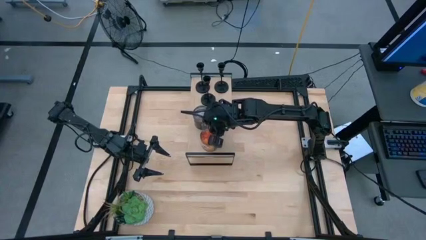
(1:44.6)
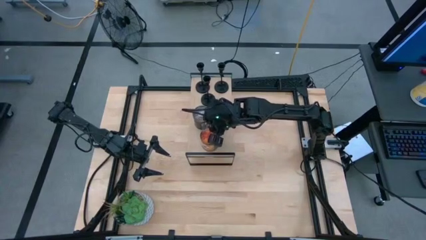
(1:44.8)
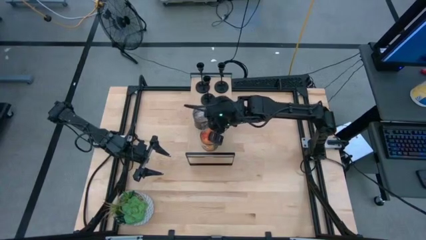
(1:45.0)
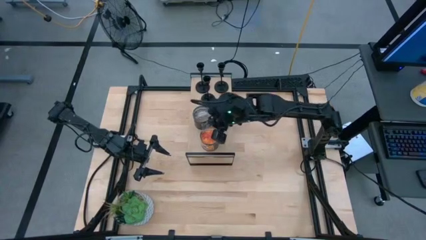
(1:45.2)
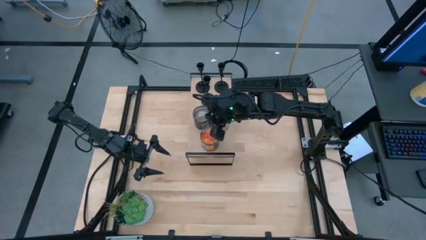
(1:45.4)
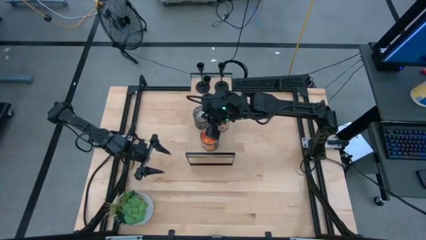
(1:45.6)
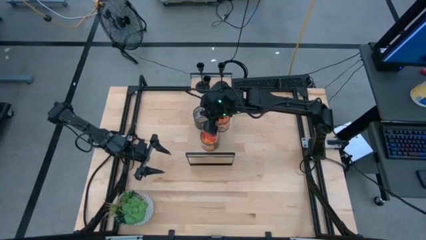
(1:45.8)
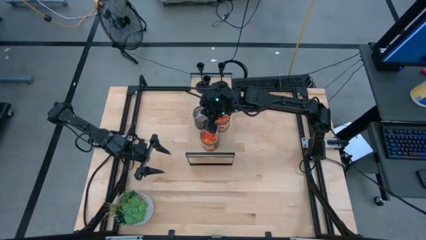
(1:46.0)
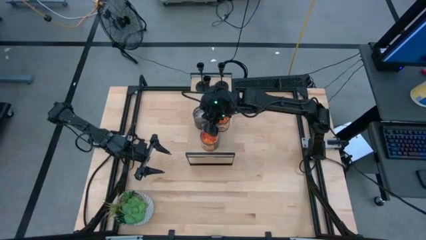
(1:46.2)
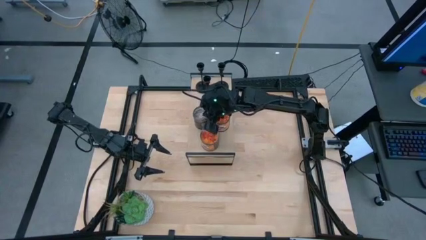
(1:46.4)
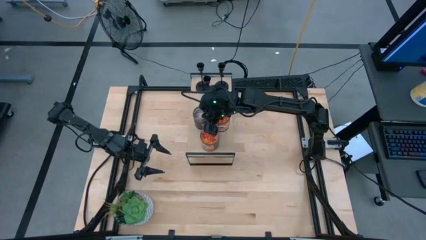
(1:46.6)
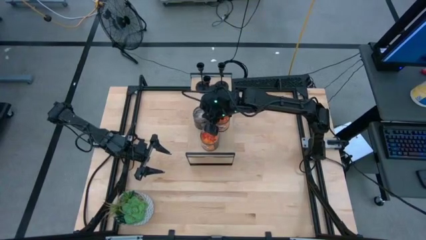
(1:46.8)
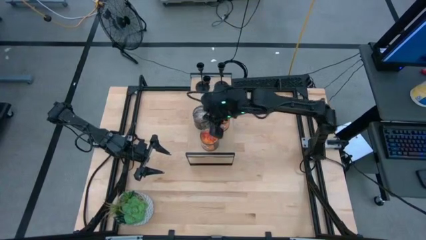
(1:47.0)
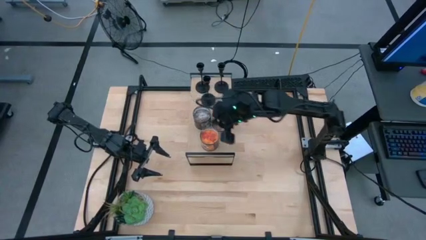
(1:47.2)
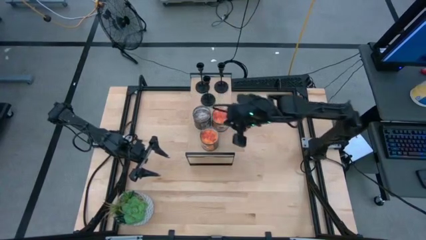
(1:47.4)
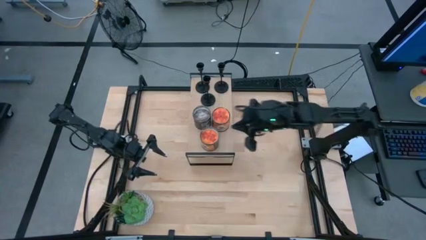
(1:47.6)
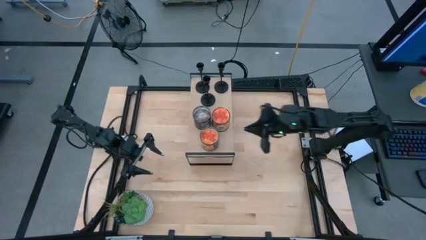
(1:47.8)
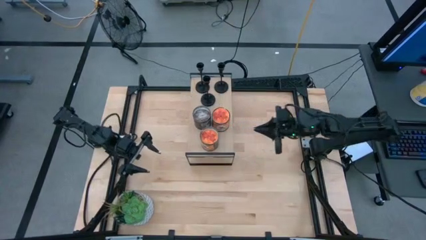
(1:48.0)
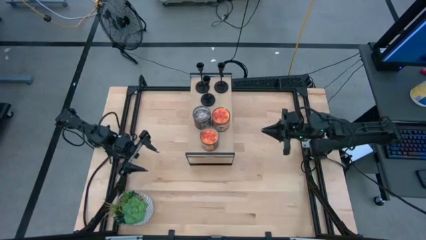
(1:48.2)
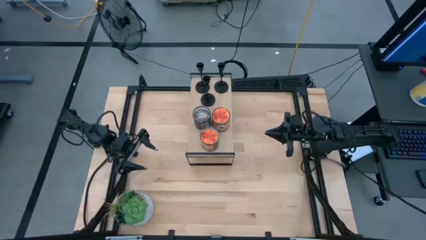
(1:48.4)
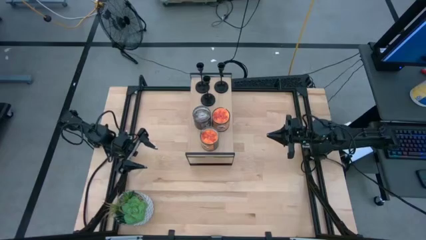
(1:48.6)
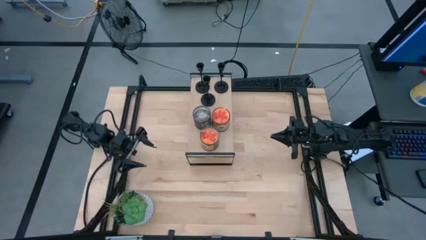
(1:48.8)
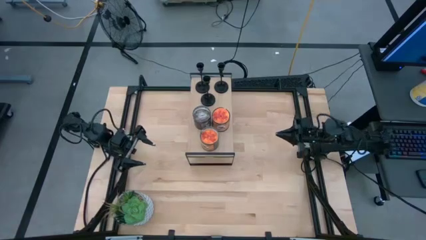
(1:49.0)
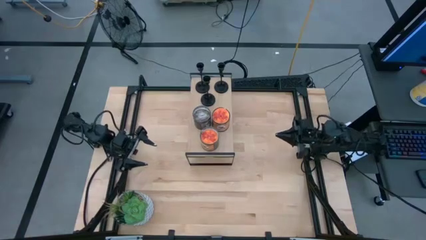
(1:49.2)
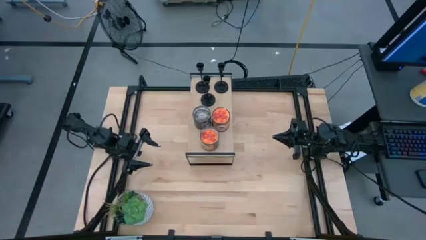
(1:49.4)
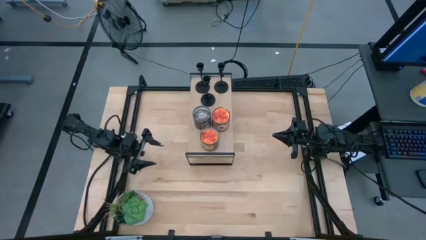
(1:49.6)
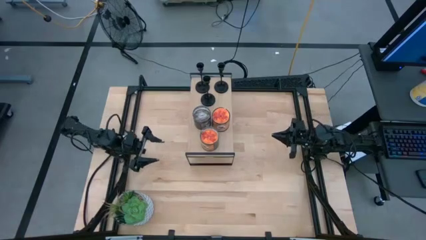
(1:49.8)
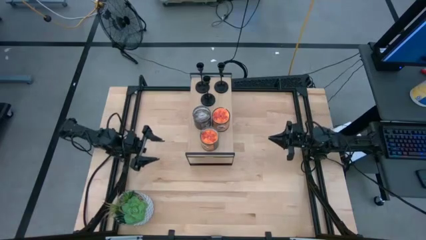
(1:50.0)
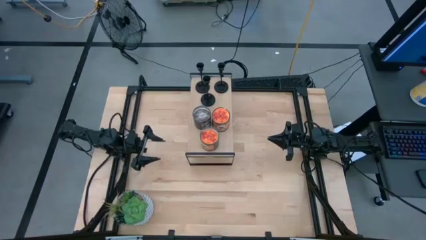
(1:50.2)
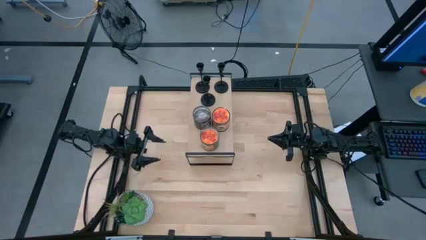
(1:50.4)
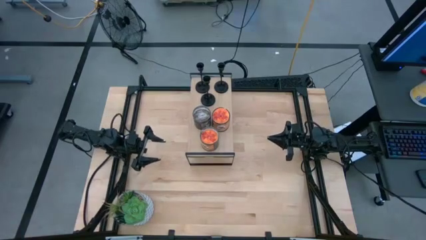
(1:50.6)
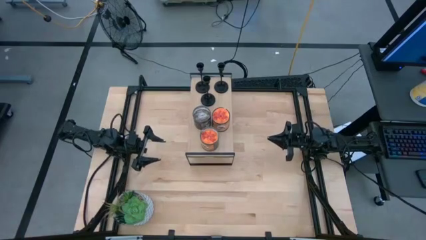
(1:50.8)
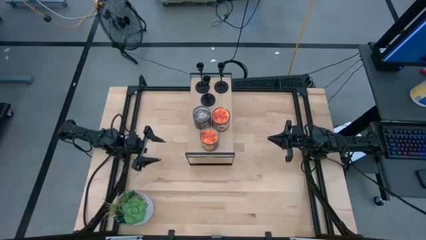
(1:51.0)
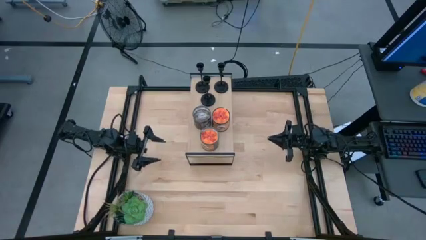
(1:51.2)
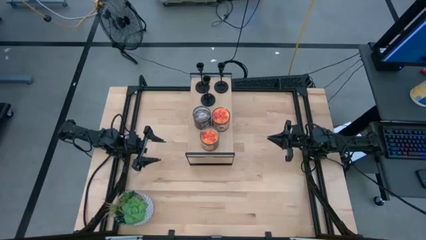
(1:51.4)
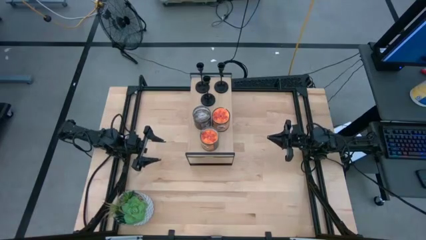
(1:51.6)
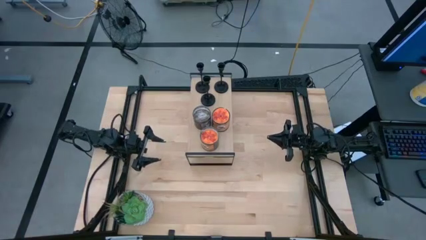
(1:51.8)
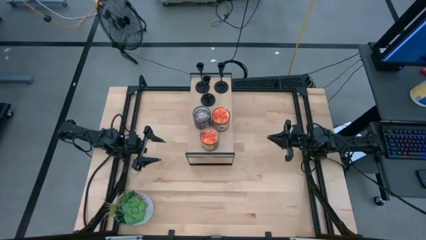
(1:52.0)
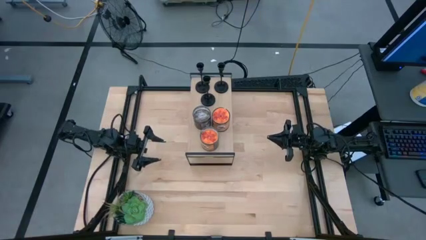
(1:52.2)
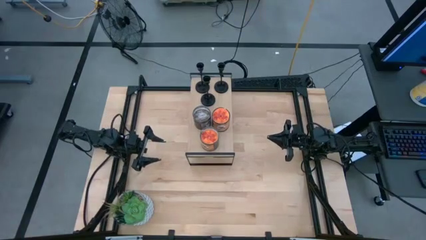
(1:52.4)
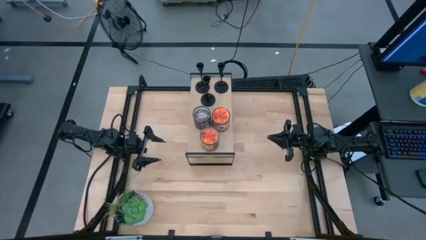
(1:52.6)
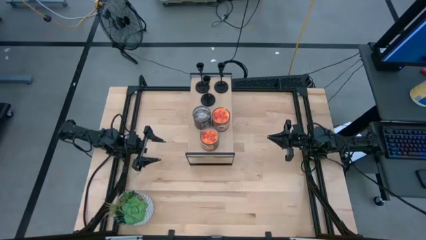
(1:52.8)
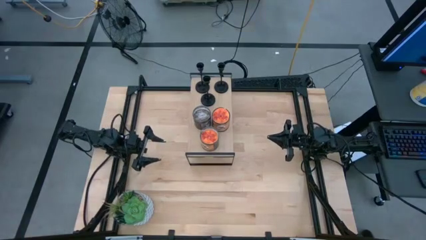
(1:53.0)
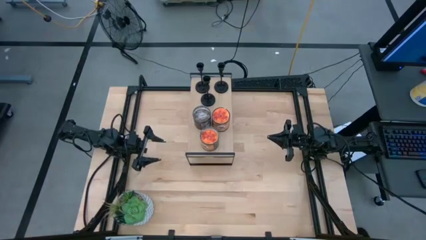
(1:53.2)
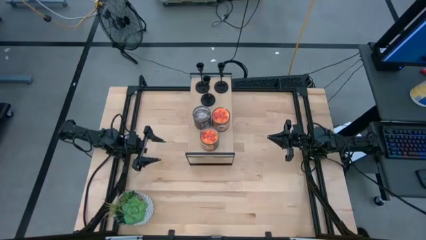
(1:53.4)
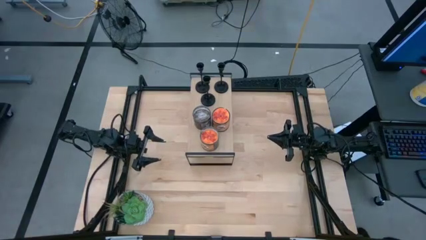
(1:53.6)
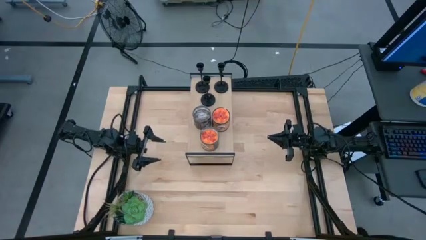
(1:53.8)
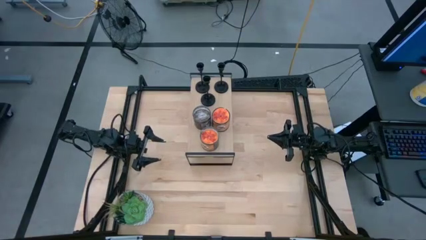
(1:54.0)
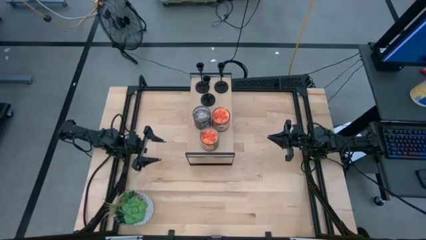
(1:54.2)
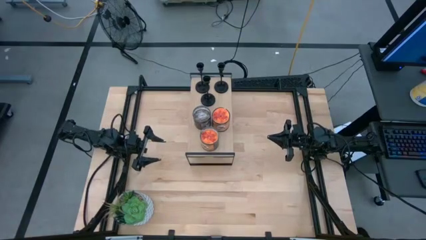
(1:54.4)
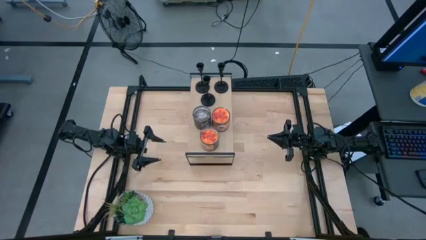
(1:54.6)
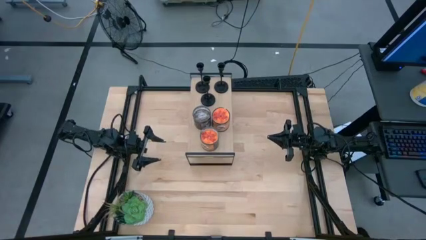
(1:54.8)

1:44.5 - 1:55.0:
Task: Pick & Place candle stick holders
Return to Home Position

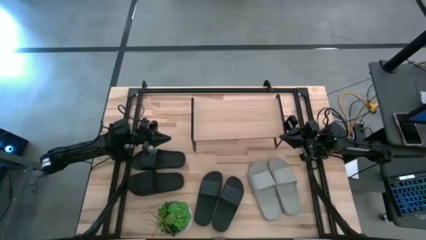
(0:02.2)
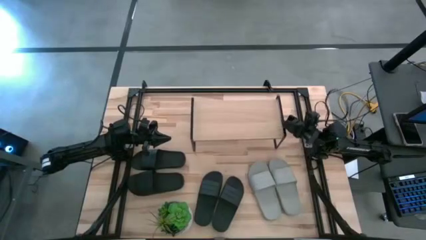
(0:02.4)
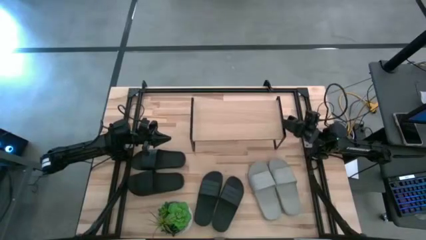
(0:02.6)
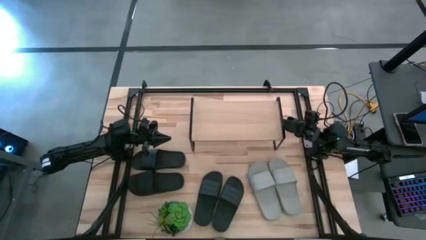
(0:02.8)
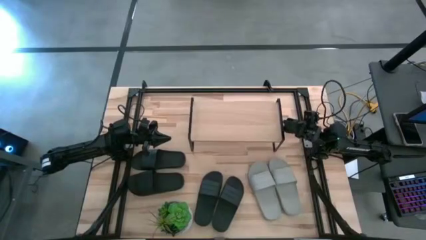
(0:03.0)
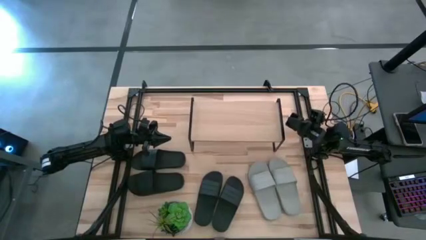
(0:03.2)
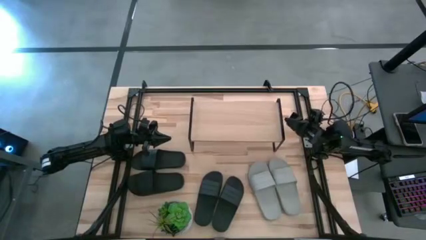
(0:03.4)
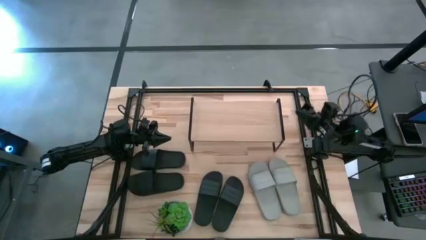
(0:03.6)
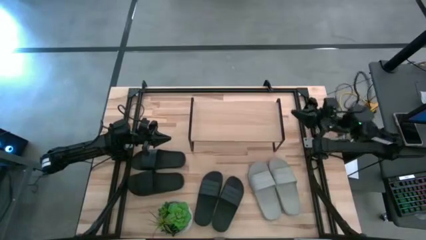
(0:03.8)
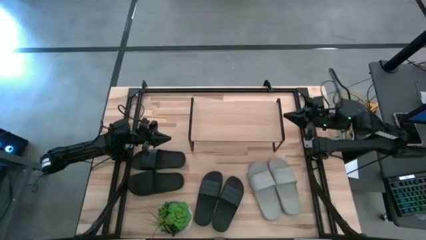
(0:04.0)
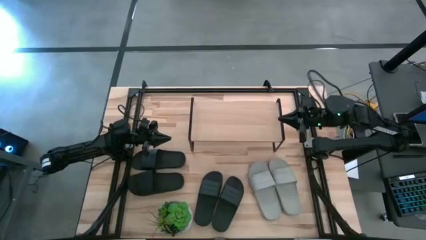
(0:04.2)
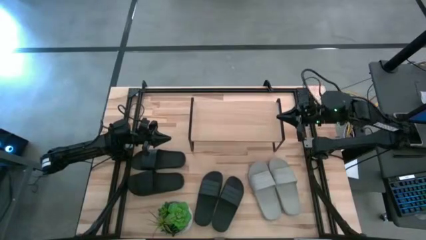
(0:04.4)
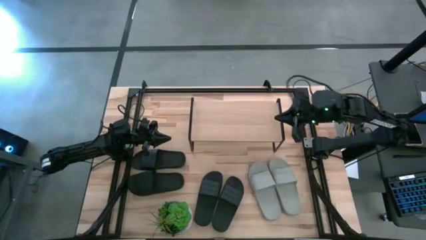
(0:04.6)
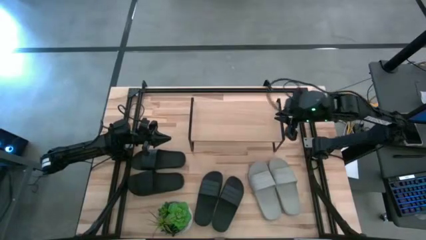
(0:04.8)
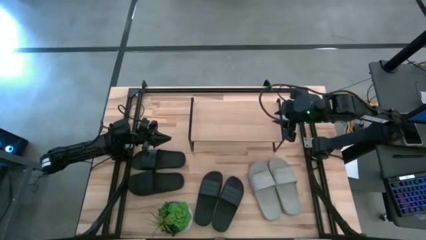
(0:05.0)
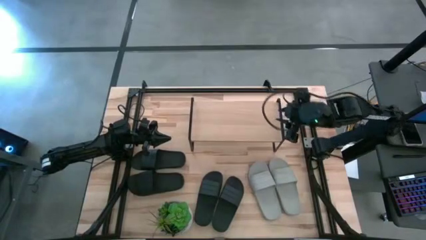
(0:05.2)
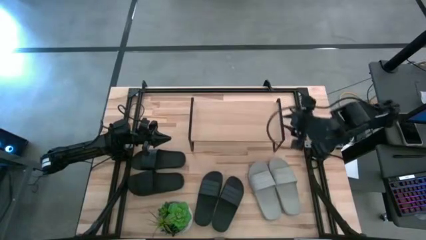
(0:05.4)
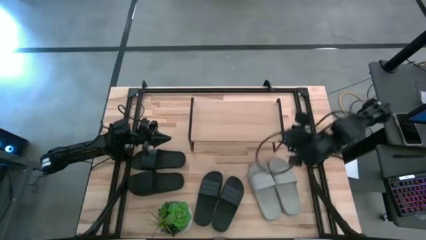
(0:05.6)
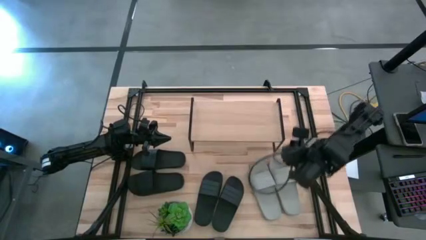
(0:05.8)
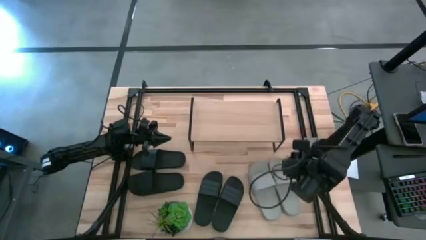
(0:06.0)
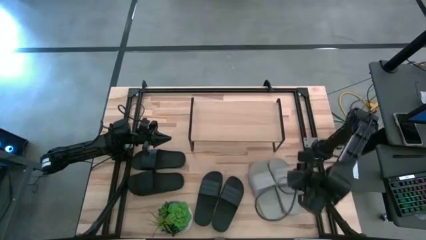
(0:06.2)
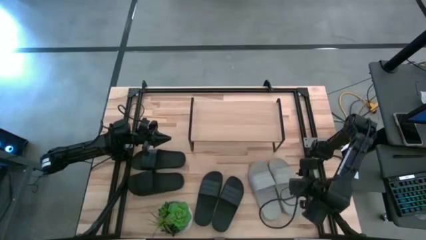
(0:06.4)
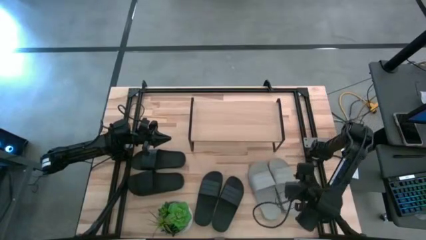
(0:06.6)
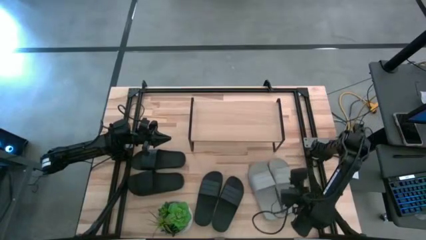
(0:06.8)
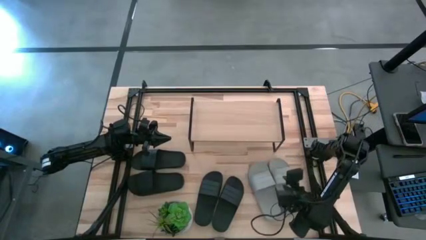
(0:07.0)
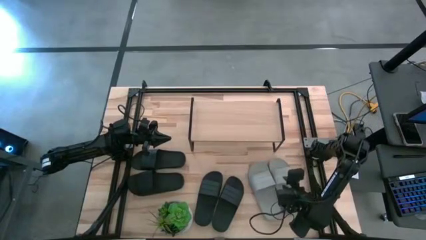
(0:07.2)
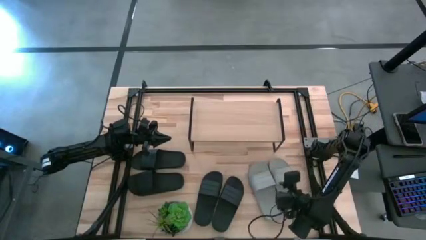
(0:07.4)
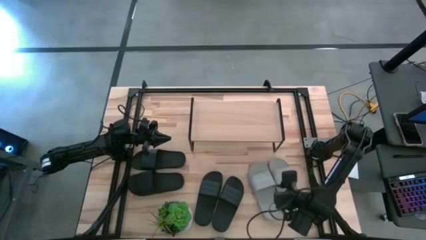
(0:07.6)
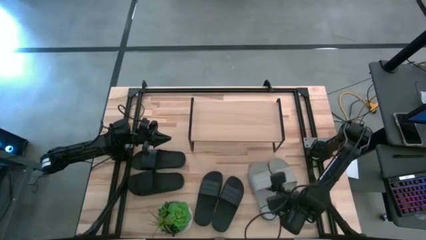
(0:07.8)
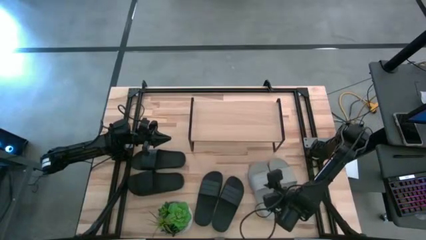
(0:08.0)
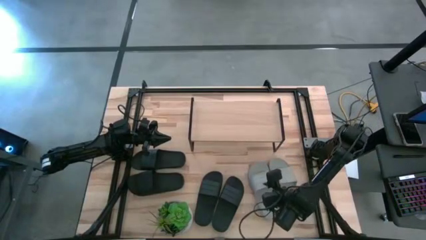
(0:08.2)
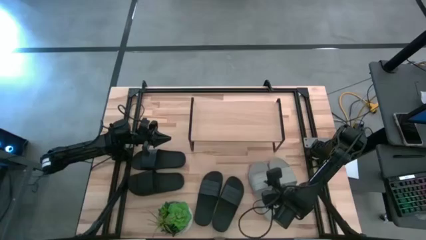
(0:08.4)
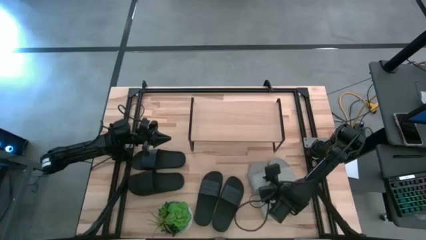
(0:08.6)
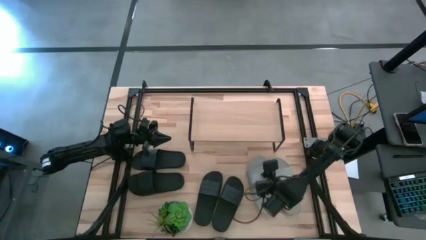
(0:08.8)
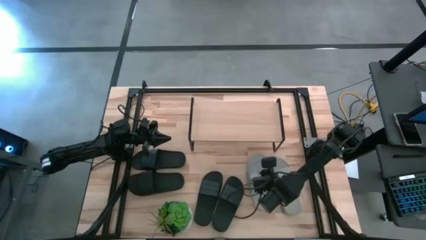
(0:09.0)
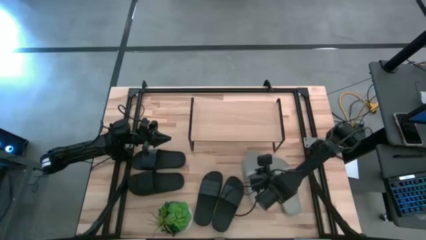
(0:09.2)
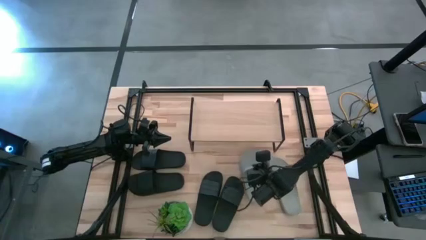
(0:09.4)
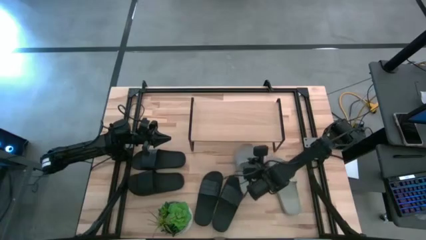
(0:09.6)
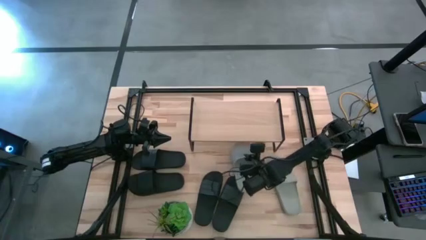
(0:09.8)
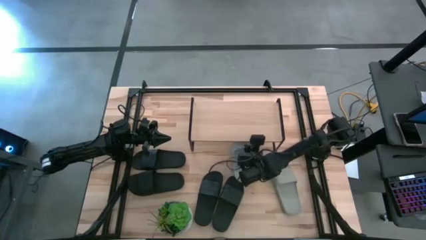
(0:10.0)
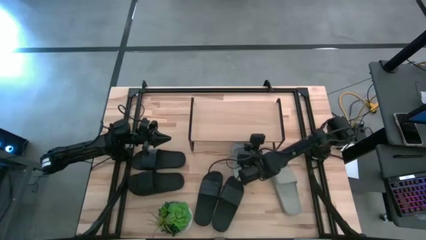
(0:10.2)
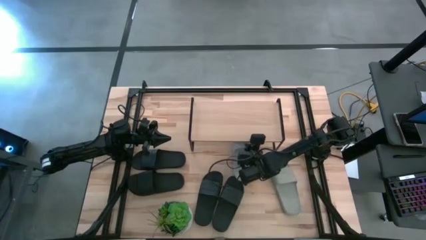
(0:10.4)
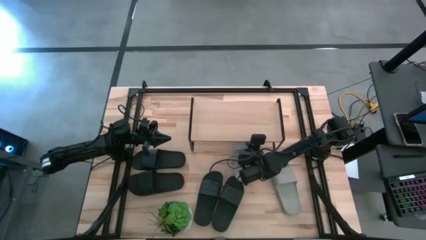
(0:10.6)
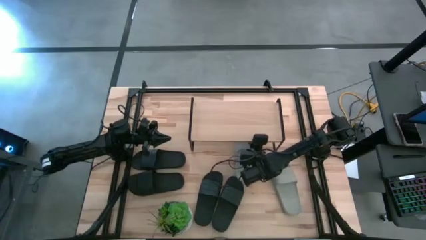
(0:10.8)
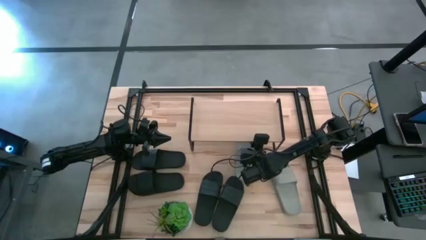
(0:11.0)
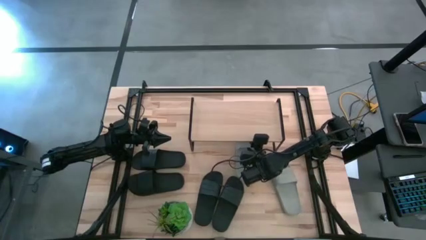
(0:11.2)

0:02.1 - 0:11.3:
Task: Pick and place slides into the shelf
Put the gray slipper under the shelf
